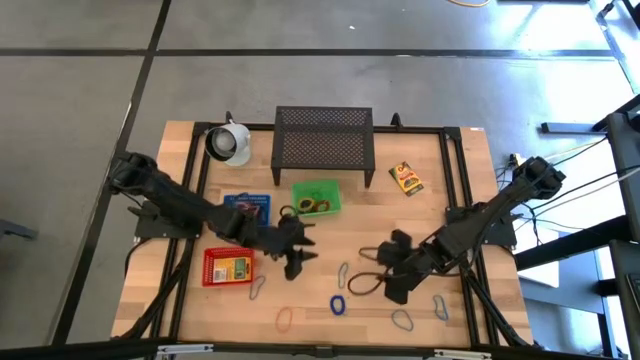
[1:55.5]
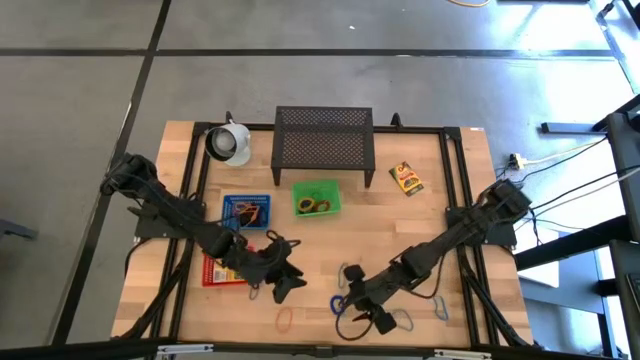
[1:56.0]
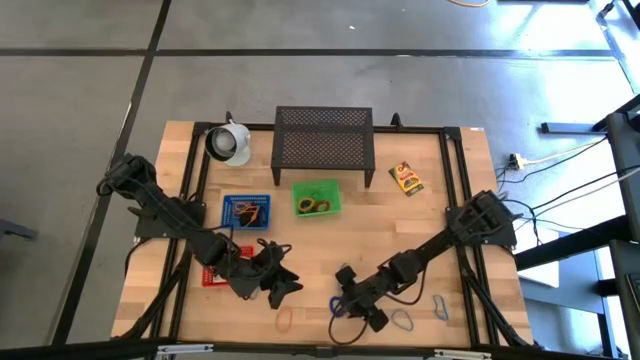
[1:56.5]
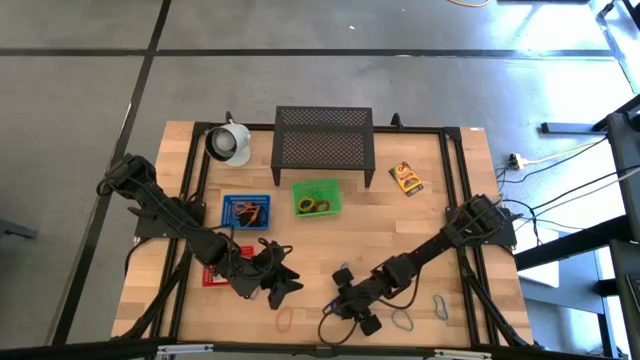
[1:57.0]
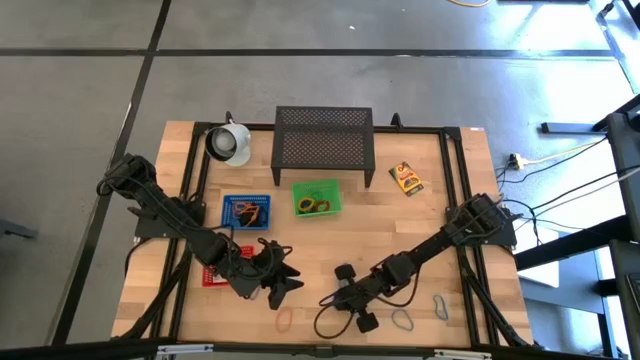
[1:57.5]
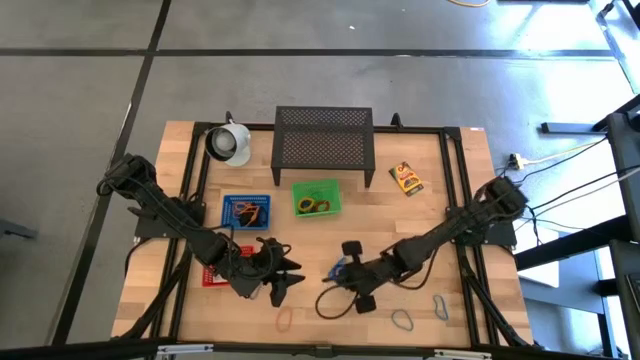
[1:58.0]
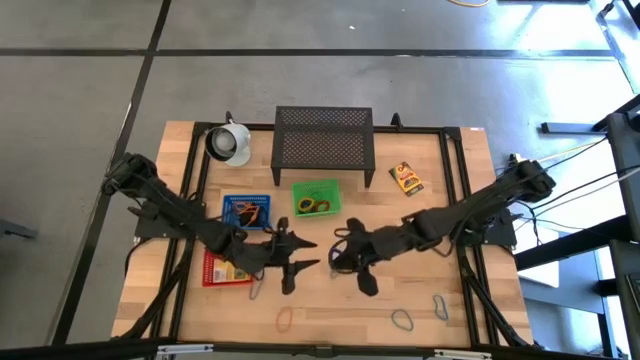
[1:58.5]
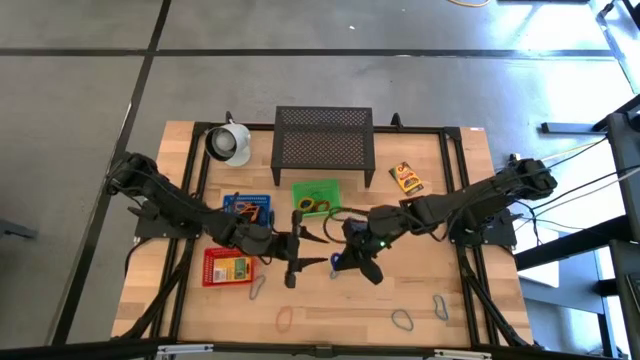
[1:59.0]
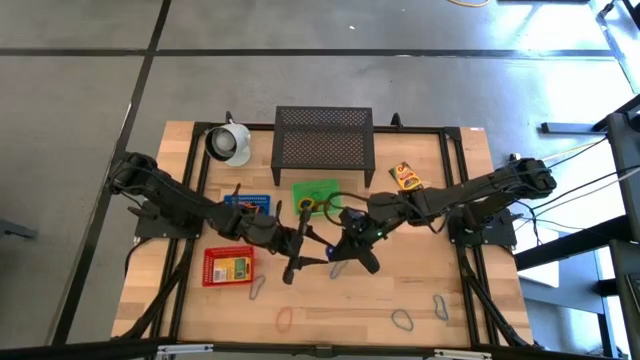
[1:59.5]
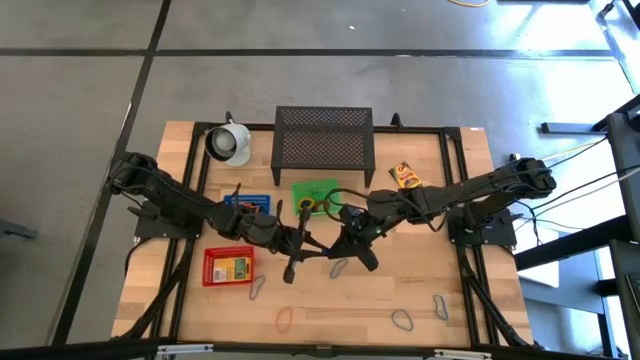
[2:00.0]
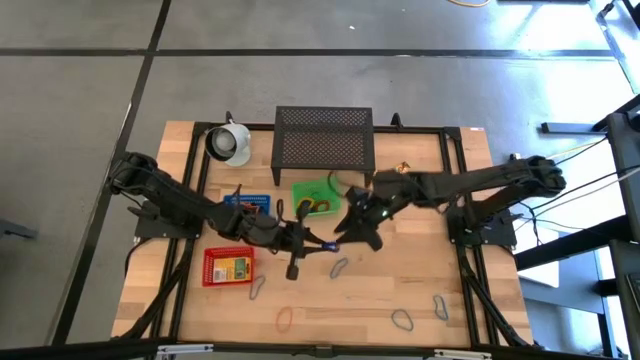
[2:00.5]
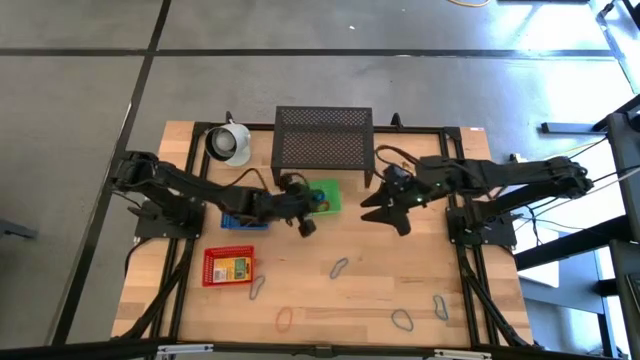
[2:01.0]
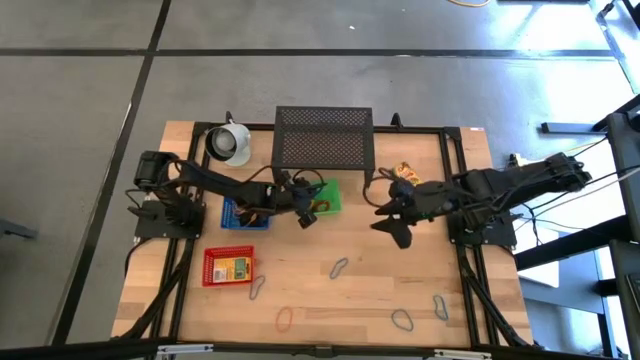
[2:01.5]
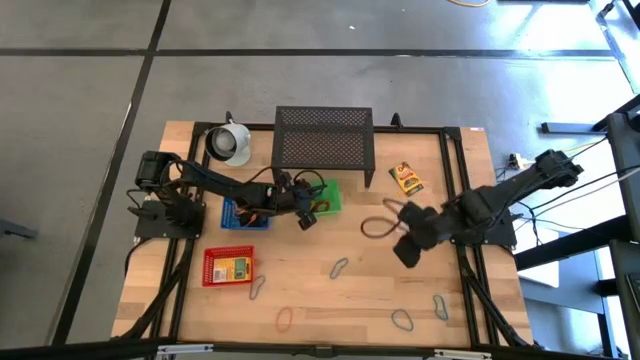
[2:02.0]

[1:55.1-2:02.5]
Task: Pick & Place Office Desk Supplies
Put the blue spring keychain into the green bin

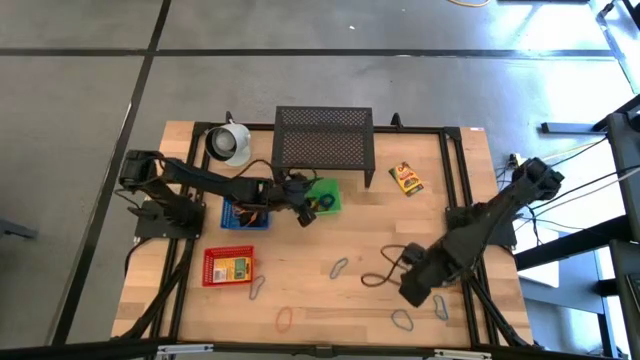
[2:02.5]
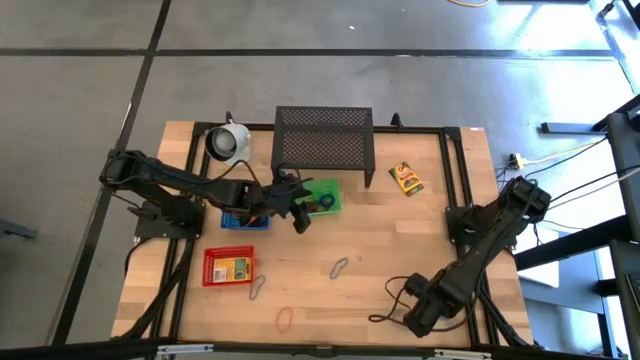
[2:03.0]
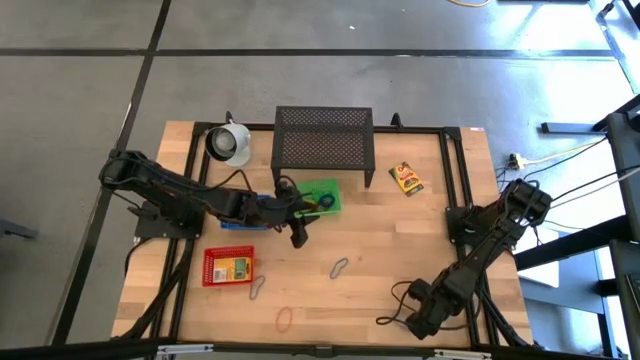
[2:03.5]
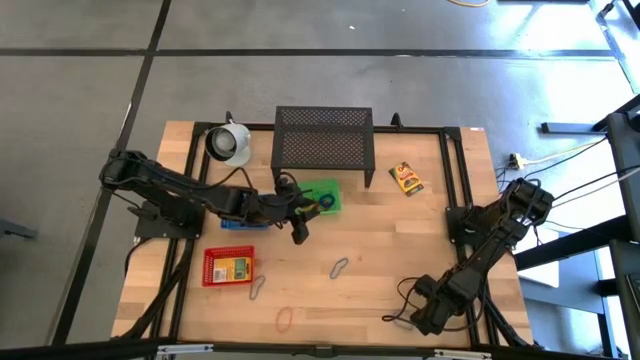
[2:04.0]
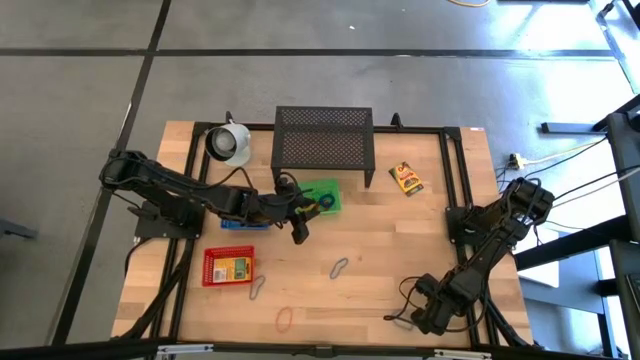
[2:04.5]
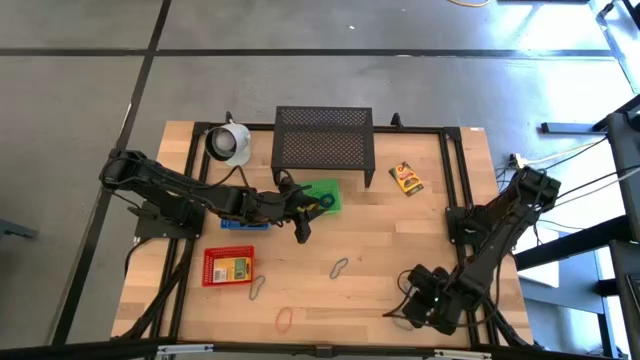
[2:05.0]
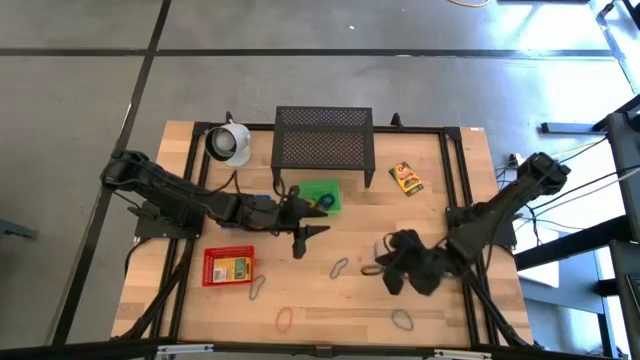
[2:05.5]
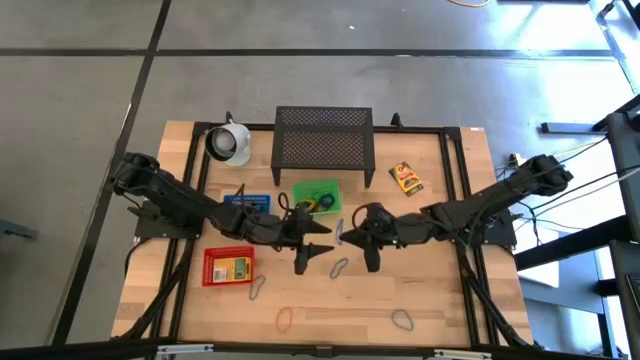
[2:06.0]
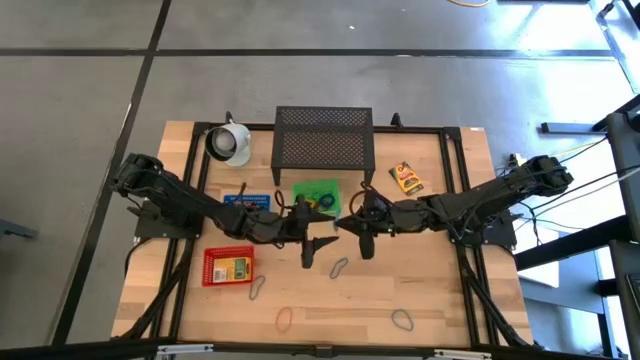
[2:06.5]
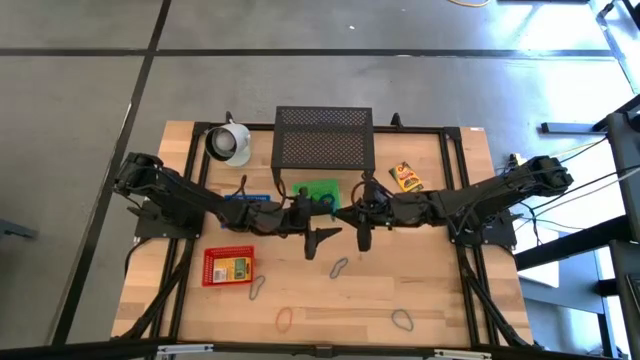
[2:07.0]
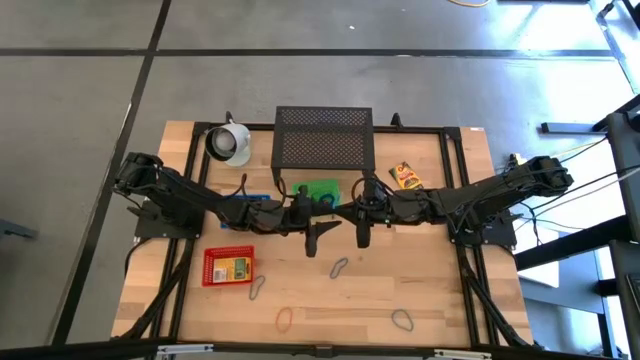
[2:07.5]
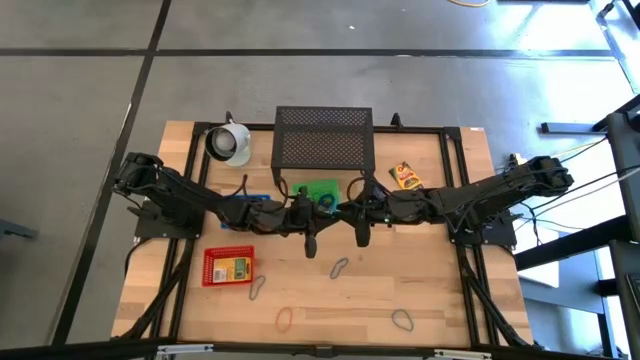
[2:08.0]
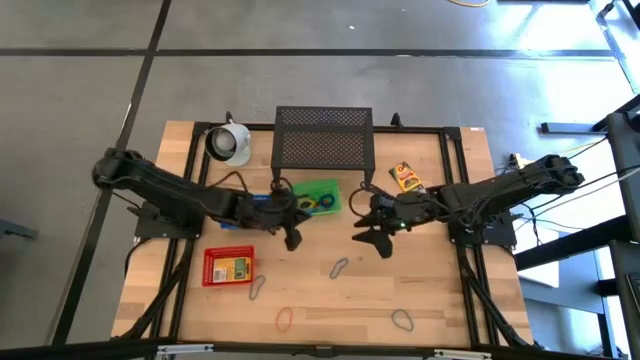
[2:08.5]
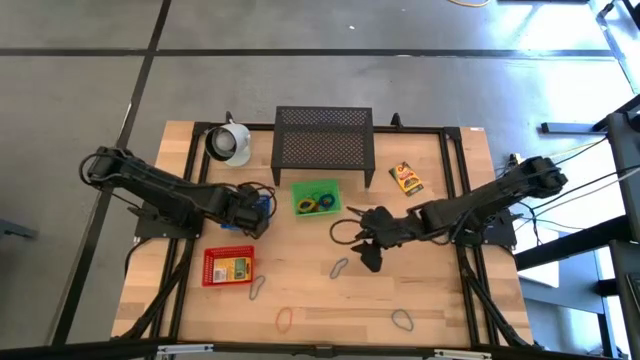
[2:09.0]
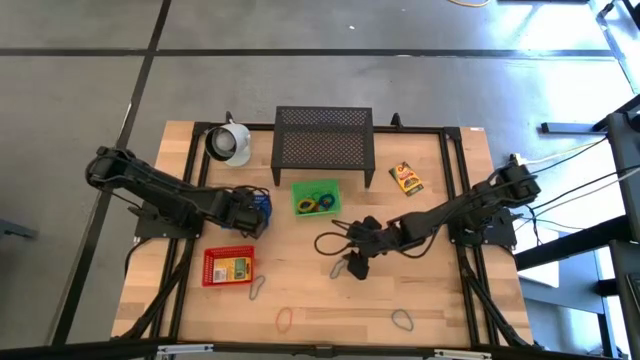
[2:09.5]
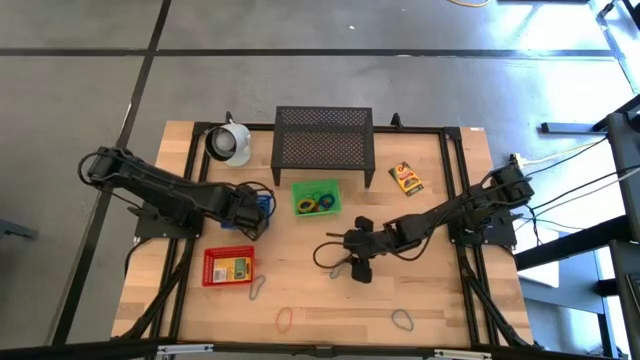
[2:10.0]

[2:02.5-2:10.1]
Put the blue rubber band into the blue bin

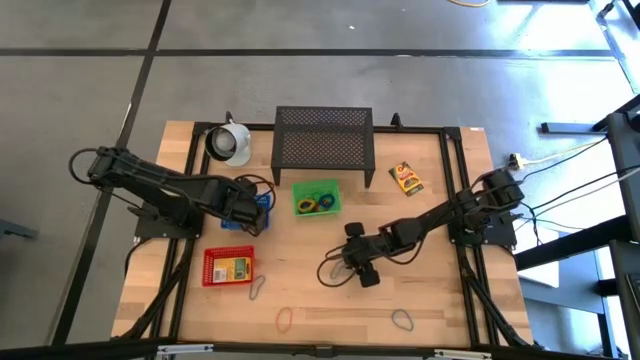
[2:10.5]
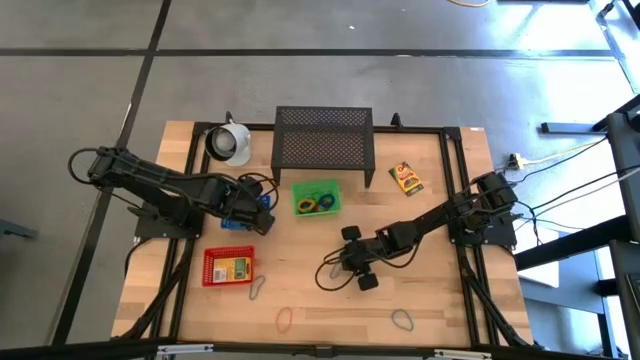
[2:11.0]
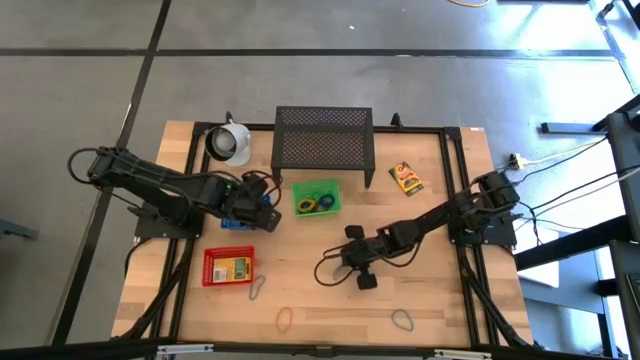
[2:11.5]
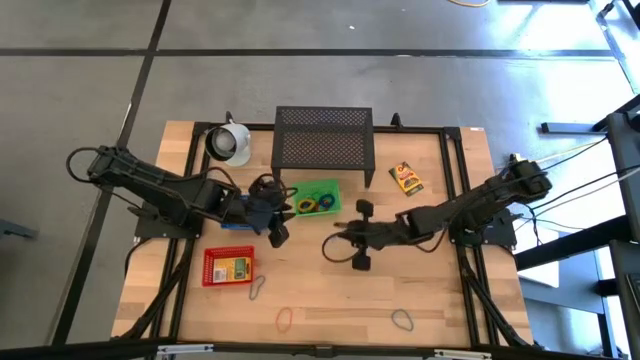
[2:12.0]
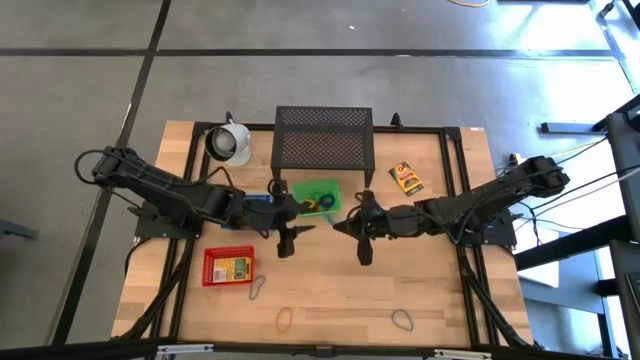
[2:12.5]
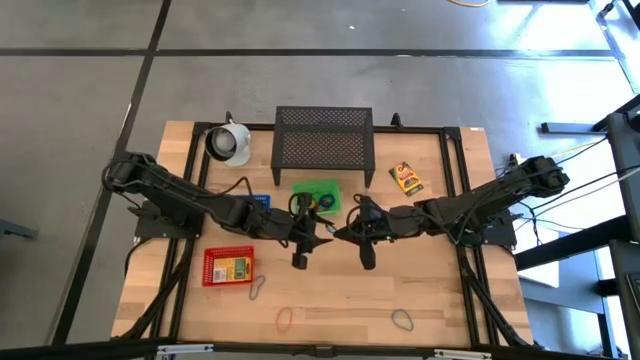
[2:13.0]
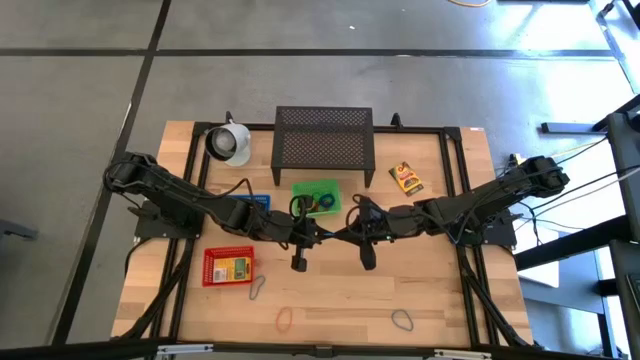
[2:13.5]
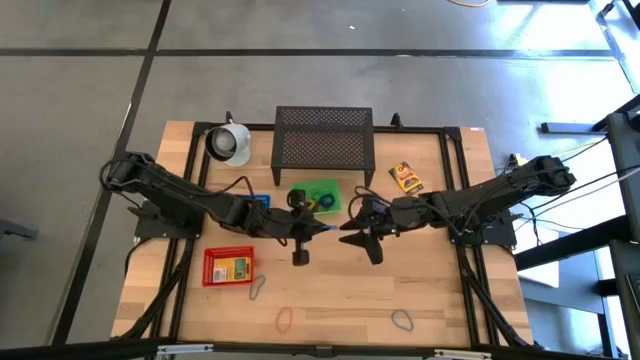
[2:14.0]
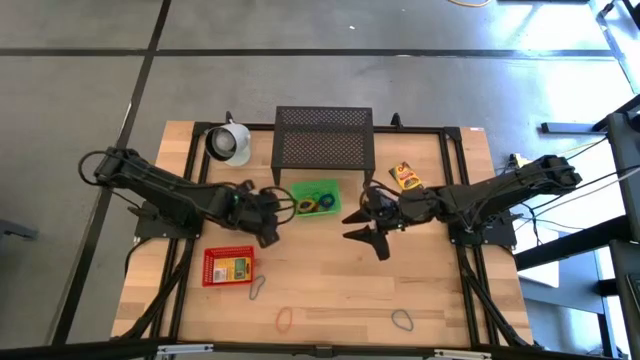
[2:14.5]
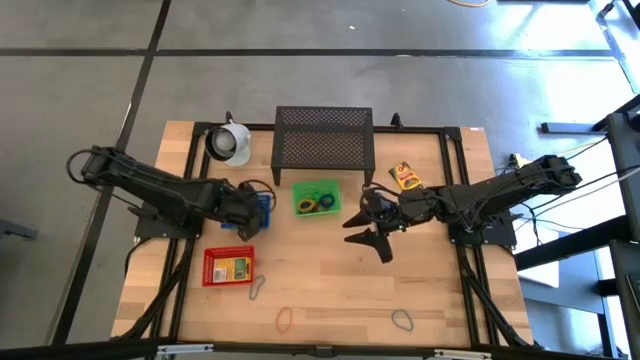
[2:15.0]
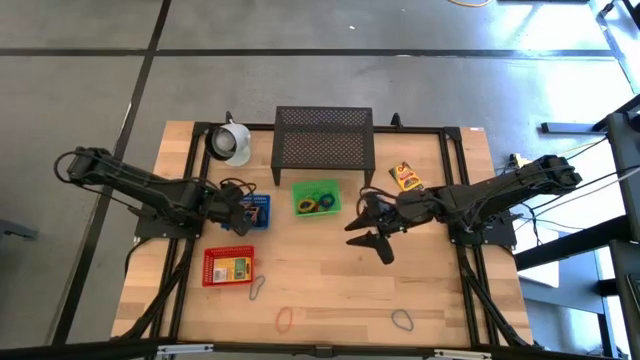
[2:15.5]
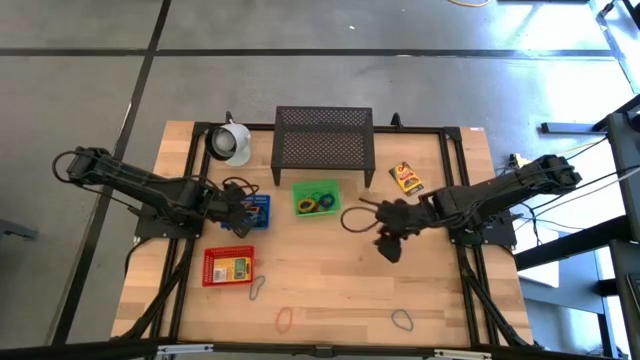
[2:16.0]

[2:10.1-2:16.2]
Put the blue rubber band into the blue bin

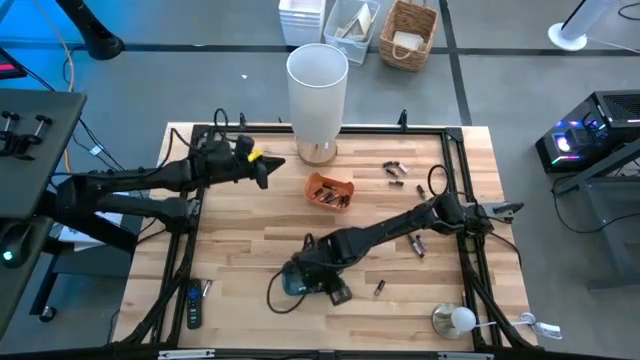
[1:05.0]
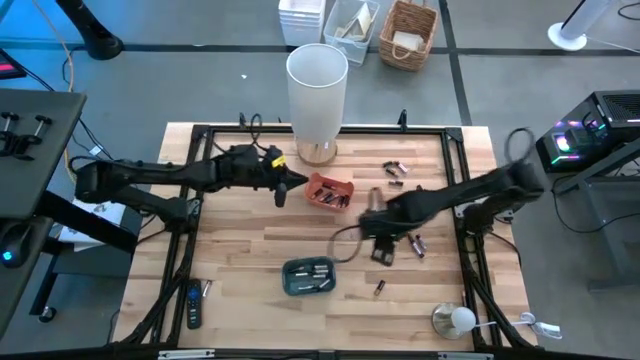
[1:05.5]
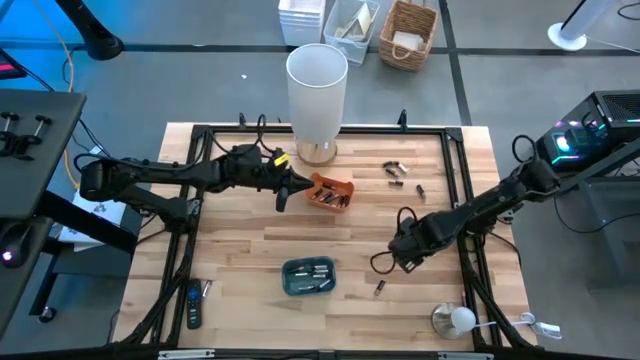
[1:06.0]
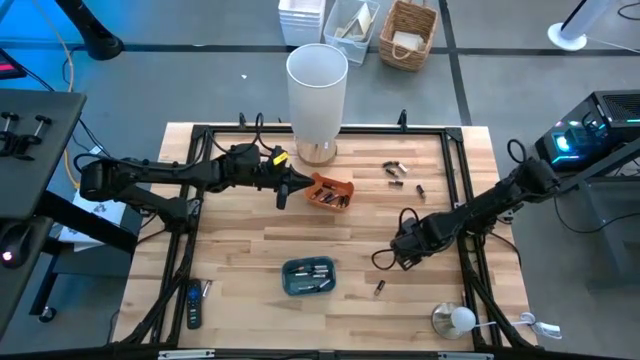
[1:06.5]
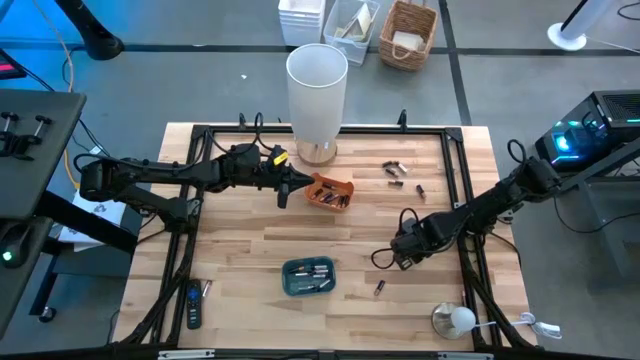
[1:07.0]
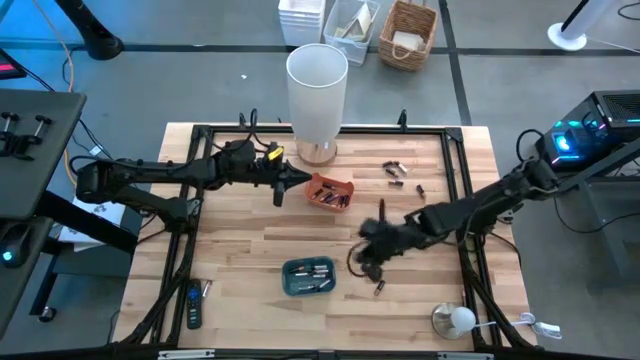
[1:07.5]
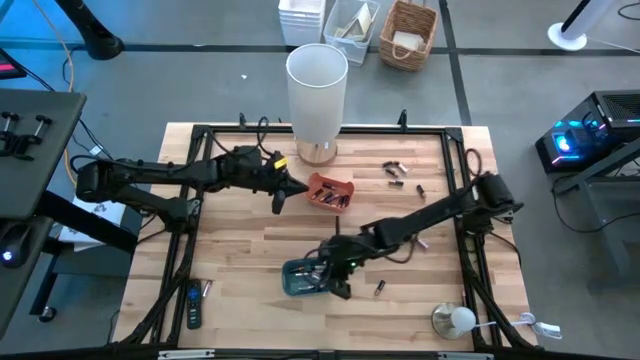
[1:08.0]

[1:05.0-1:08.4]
Task: Sort batteries
Put the silver battery into the blue bin
